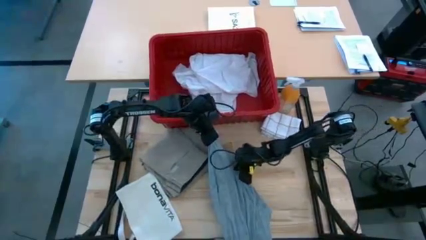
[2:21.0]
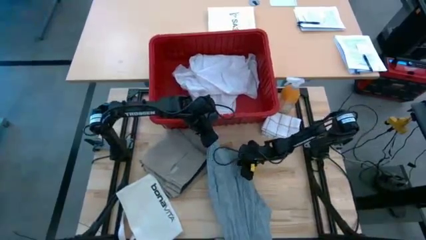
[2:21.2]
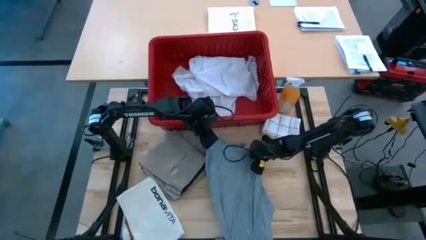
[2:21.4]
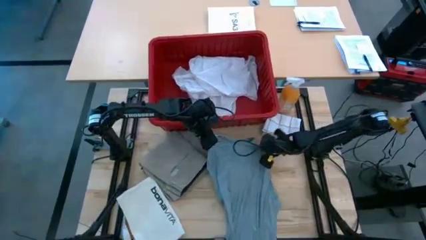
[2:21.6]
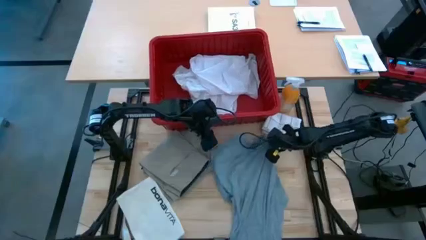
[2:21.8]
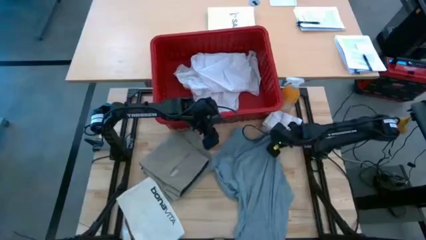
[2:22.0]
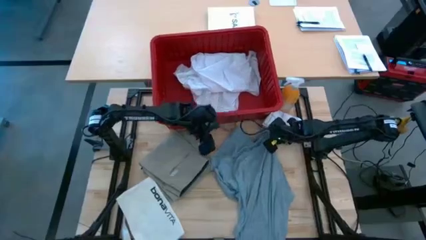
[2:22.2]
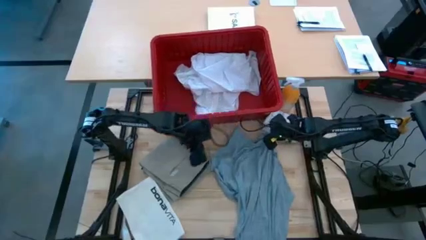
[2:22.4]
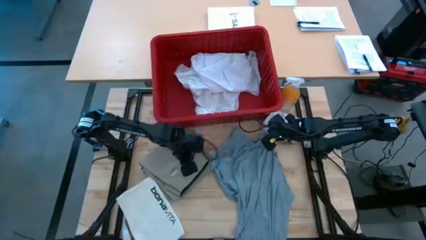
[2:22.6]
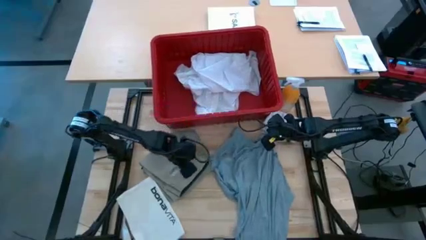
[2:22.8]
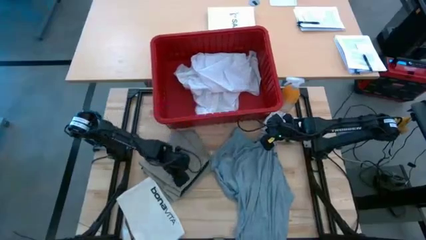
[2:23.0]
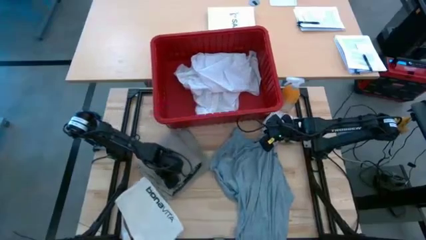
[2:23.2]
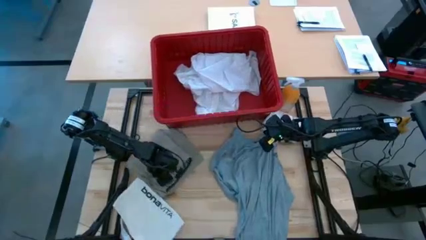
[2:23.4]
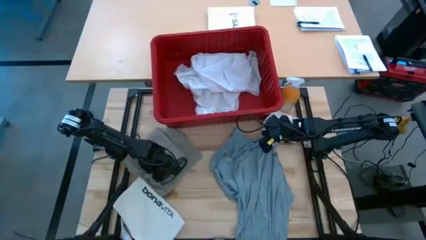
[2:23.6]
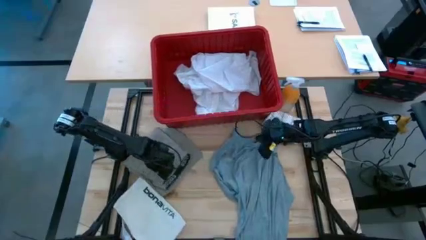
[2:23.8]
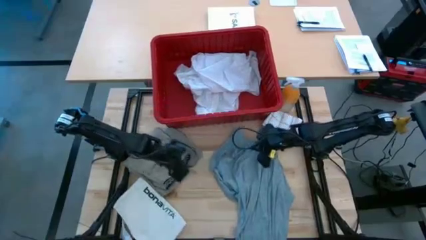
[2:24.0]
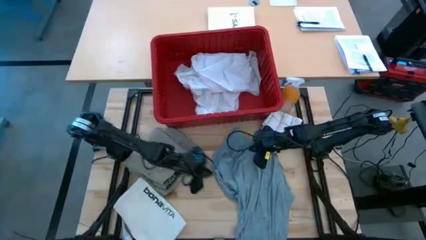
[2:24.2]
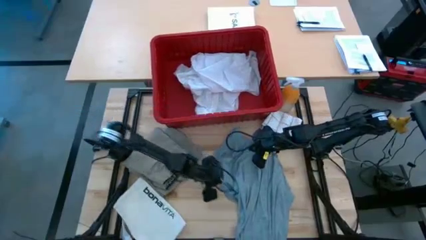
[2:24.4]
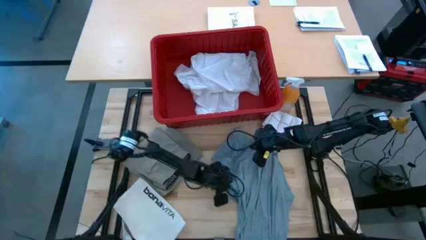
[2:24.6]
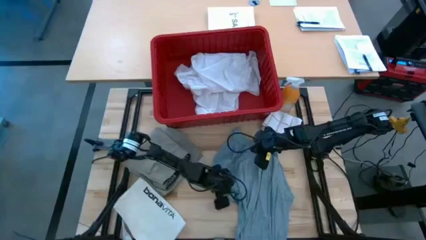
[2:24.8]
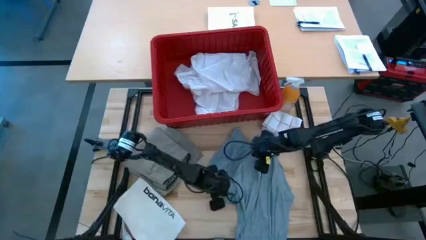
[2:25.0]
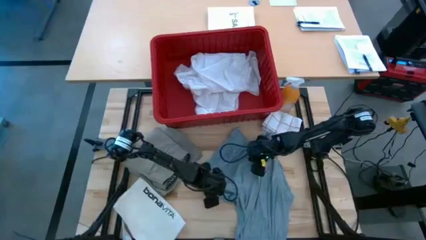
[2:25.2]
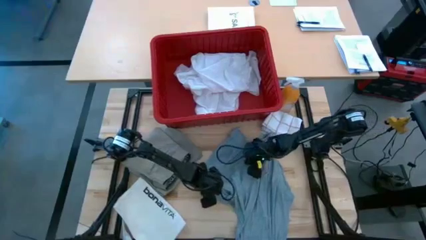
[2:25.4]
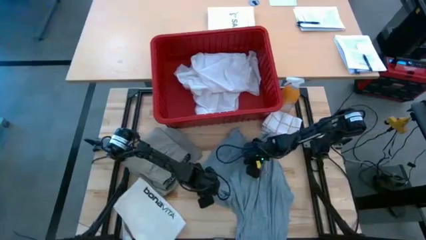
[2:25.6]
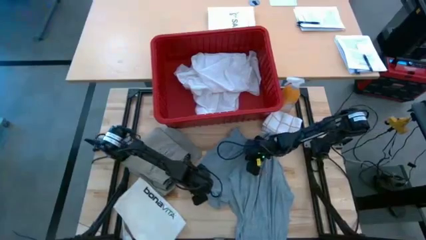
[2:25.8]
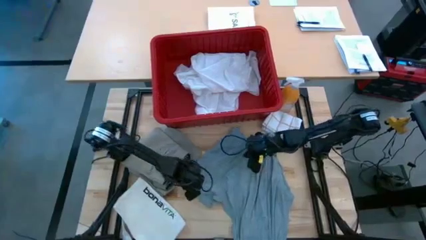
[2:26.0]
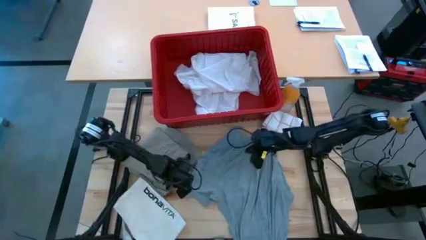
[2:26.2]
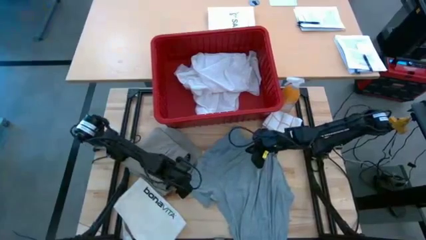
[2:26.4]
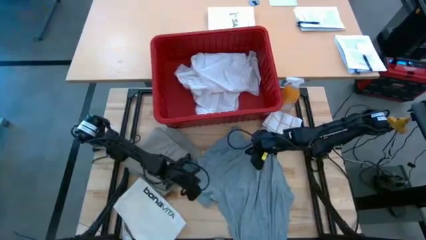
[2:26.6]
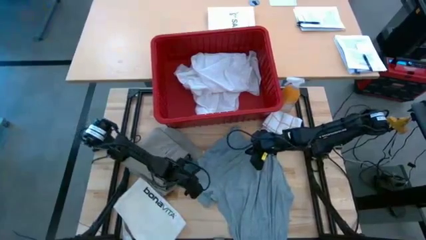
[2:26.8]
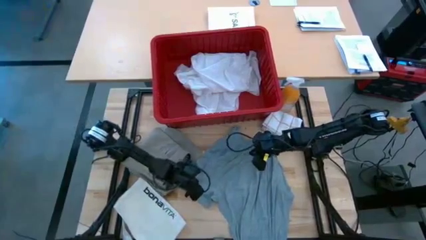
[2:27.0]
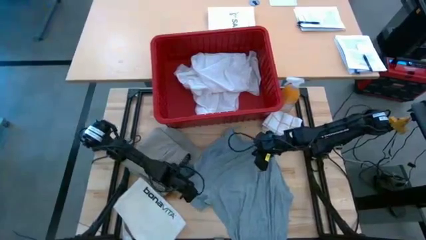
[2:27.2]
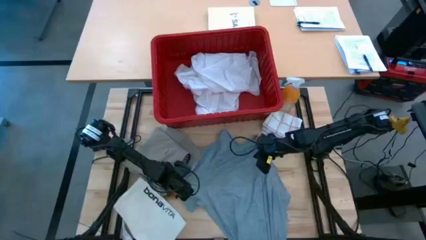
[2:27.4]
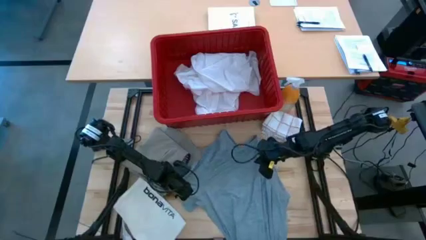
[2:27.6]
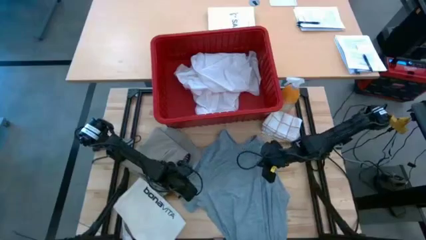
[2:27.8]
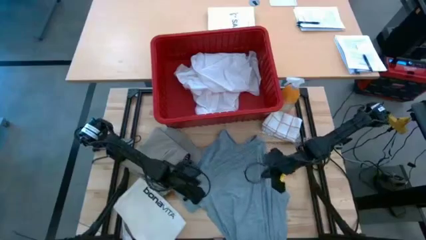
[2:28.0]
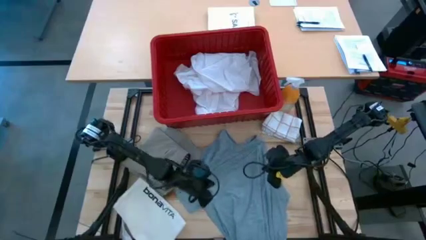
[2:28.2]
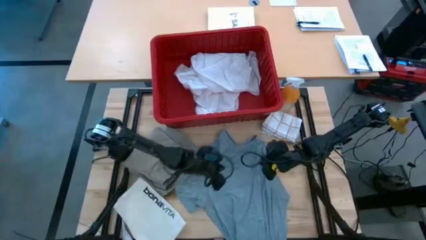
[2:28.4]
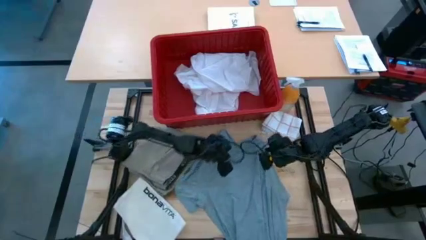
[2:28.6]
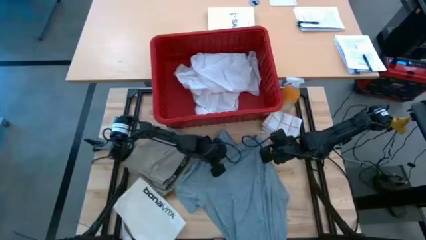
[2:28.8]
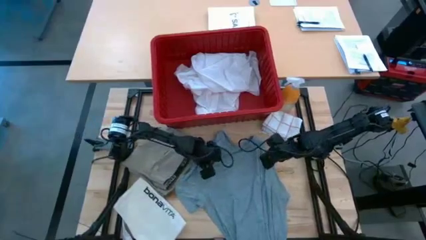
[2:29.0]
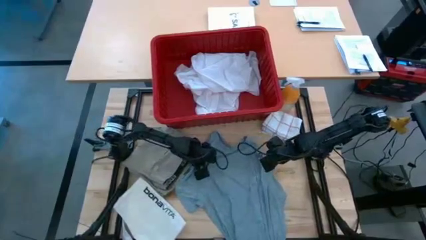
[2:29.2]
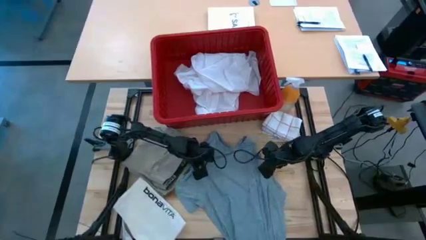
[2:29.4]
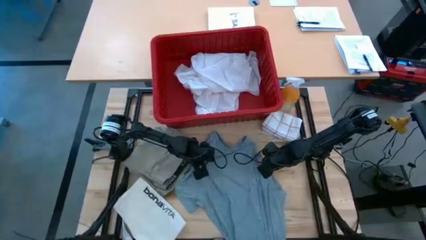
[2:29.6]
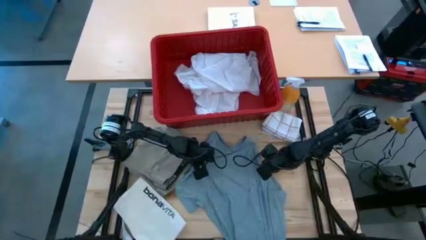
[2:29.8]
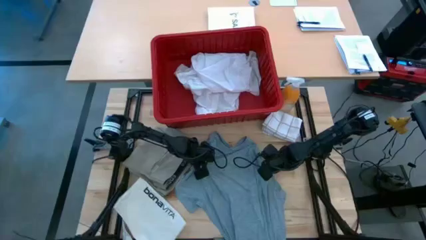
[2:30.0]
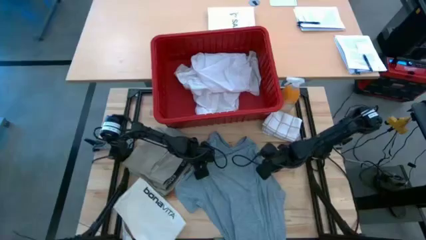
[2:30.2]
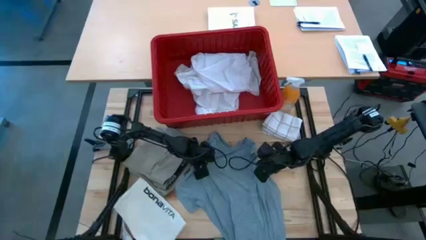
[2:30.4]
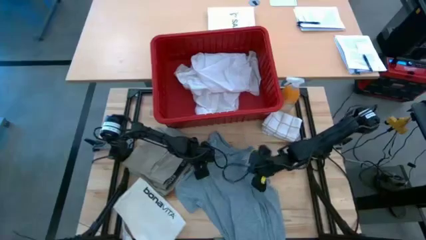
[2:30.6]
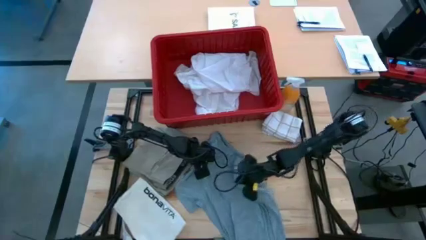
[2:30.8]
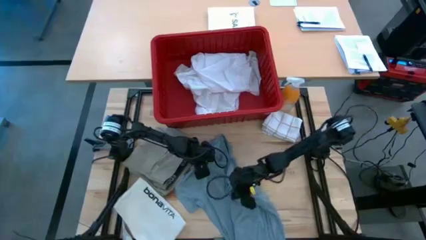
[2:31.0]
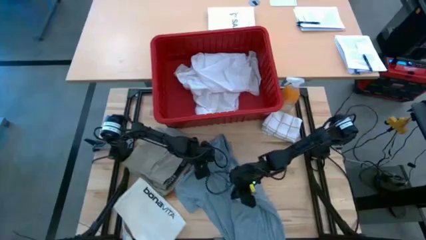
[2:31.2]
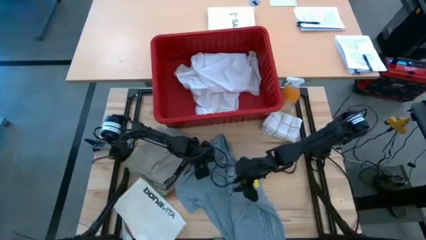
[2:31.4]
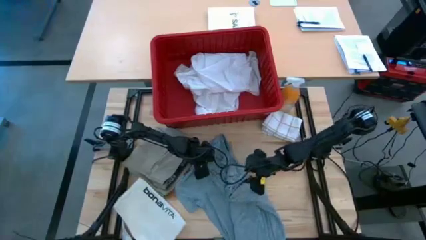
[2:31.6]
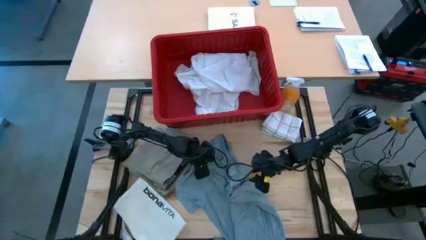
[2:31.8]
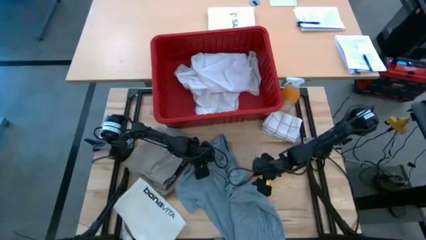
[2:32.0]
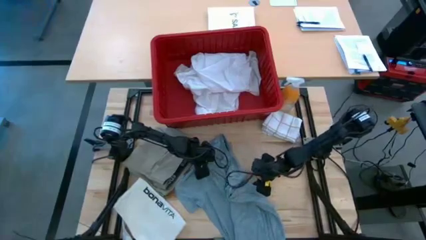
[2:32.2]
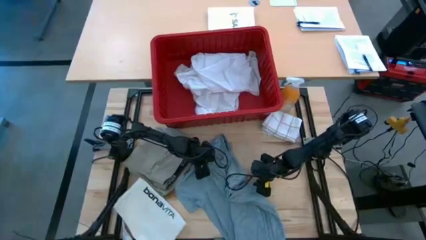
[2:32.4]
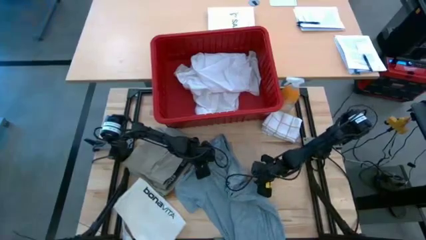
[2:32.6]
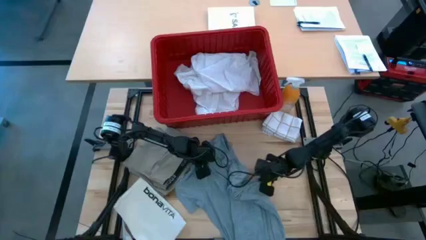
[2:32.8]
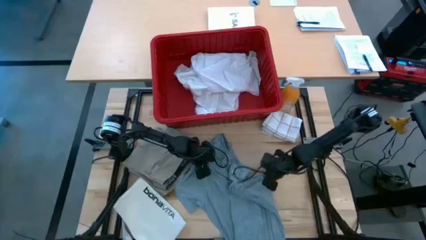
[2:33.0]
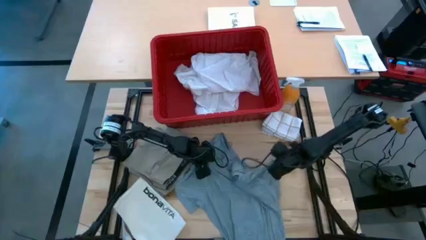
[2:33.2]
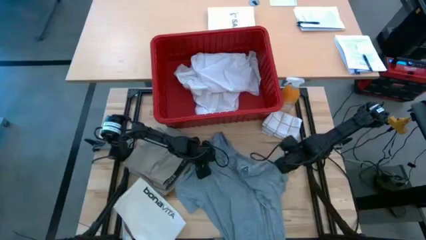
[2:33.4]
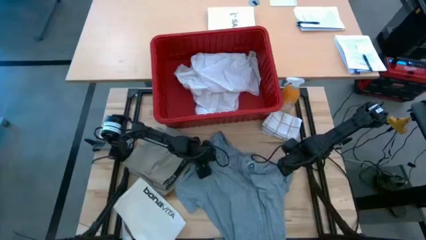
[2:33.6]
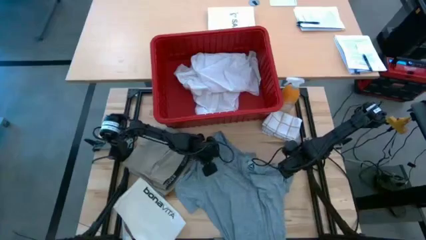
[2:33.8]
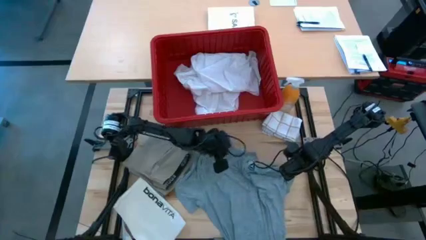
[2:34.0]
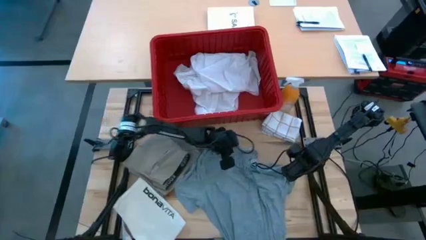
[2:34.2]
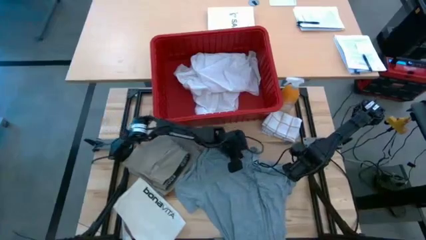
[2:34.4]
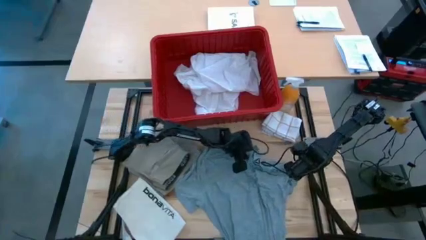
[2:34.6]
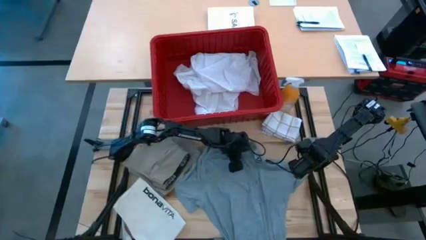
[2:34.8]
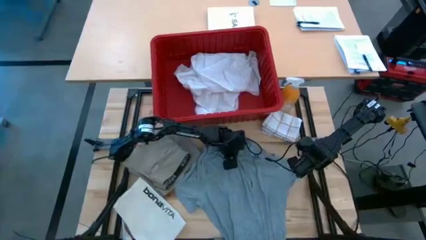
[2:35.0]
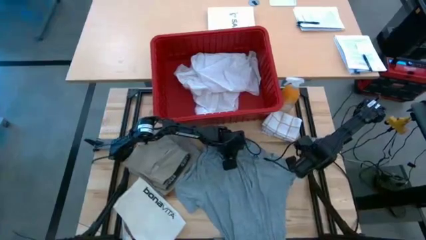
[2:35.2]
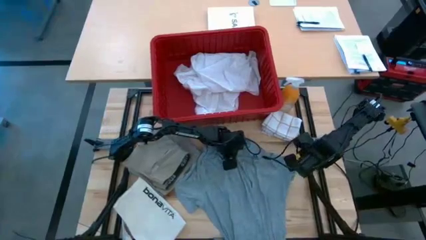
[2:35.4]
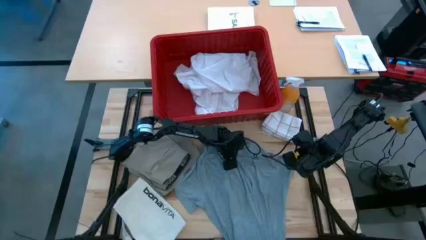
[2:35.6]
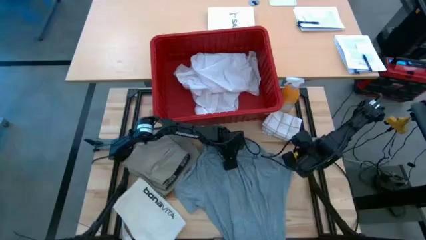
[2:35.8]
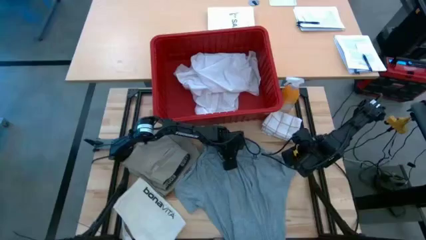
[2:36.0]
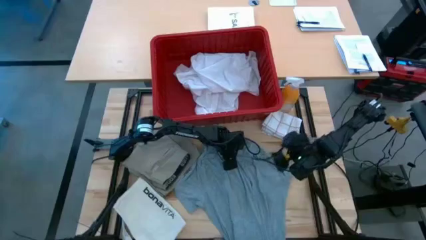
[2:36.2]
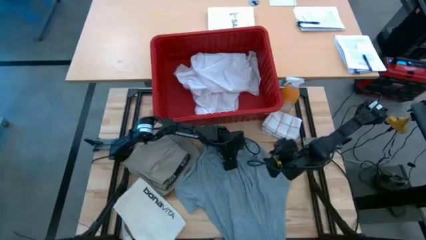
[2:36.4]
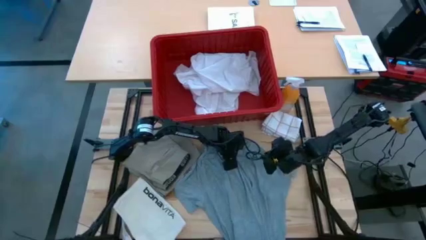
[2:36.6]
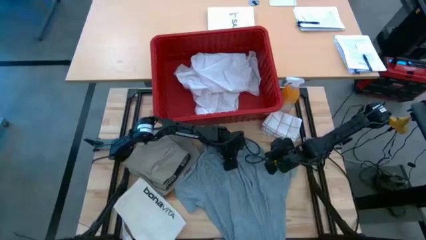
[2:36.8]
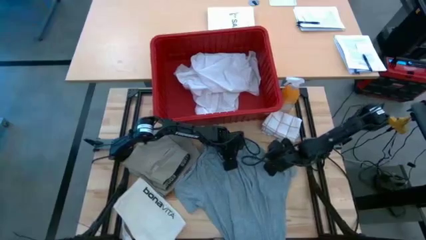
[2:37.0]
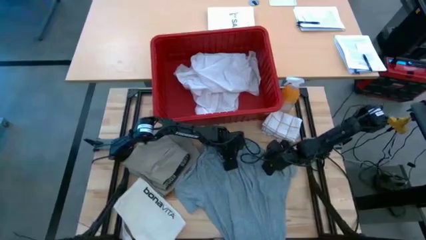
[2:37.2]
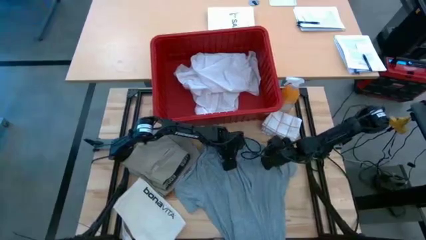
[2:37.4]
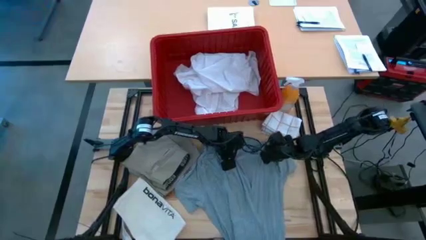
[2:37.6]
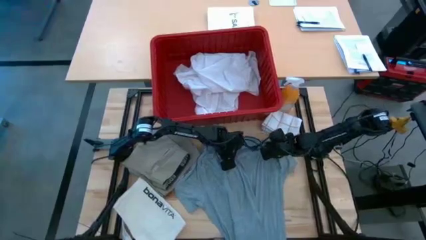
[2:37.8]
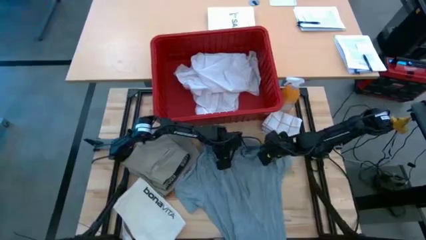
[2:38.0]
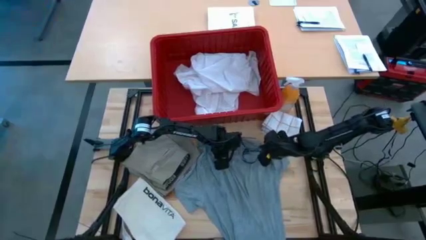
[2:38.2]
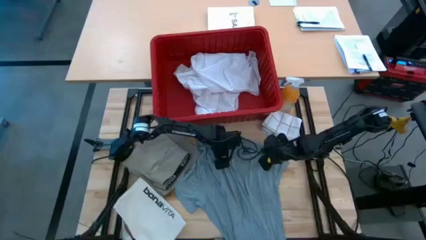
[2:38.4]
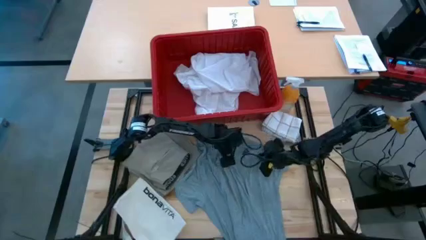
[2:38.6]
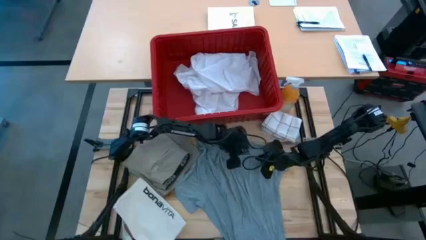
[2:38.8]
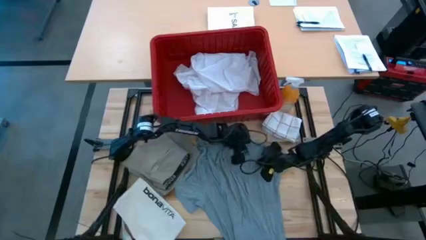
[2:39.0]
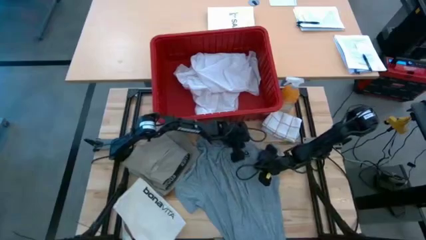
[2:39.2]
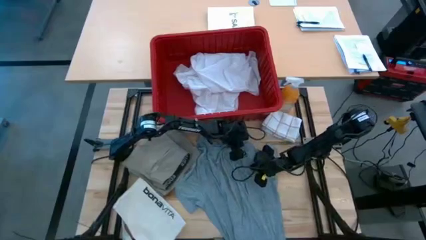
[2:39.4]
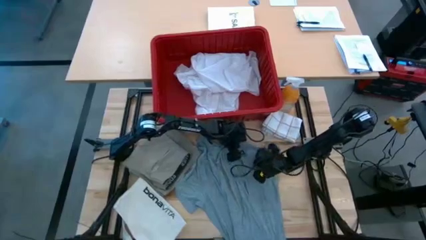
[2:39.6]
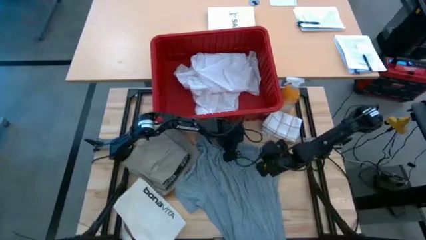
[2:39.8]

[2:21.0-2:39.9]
Task: Fold laundry
Fold the gray shirt
